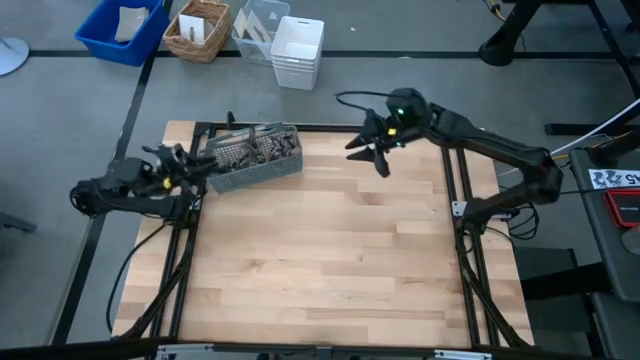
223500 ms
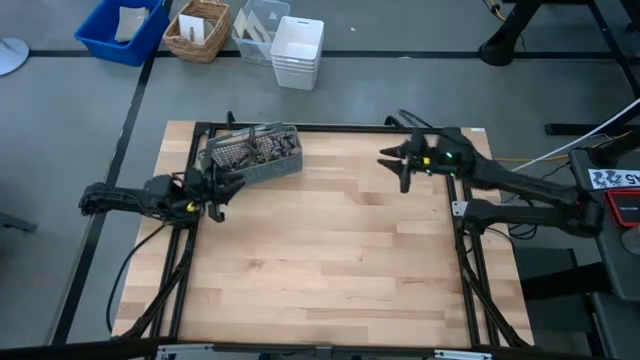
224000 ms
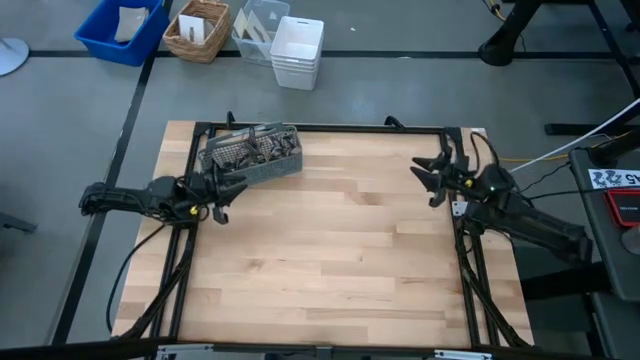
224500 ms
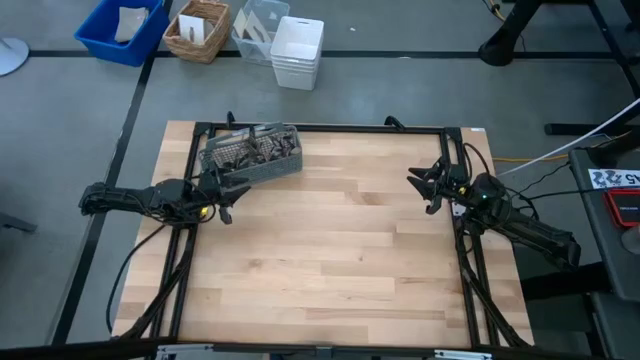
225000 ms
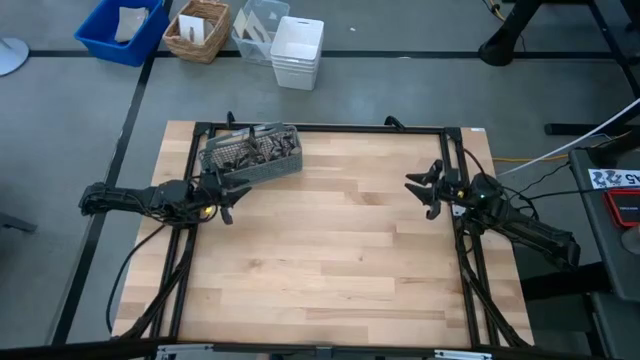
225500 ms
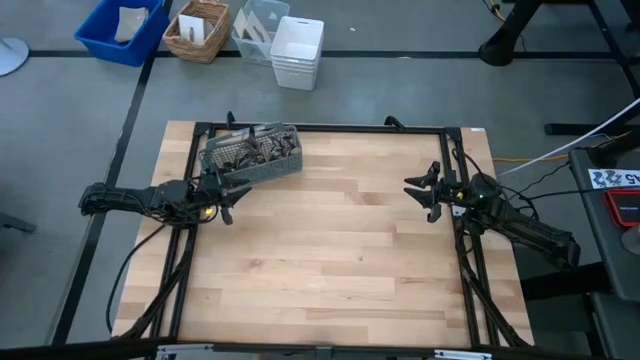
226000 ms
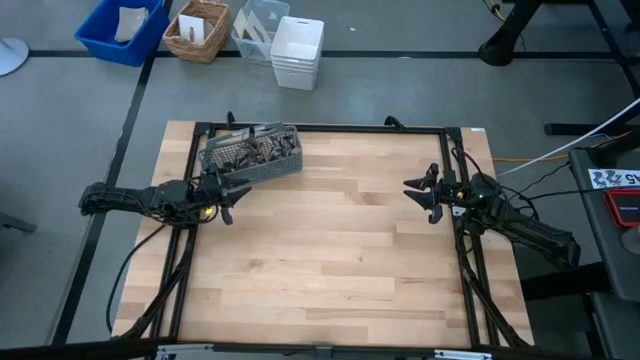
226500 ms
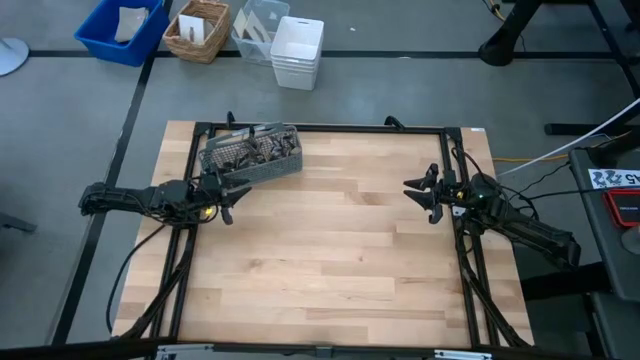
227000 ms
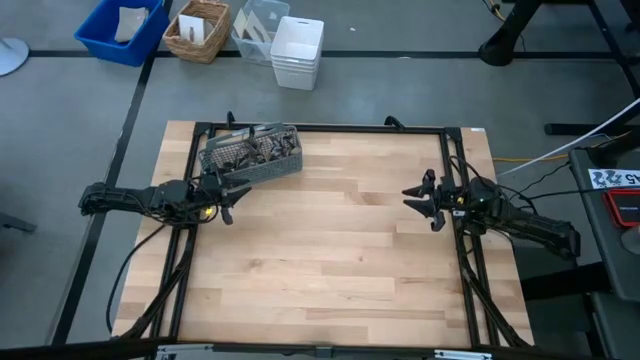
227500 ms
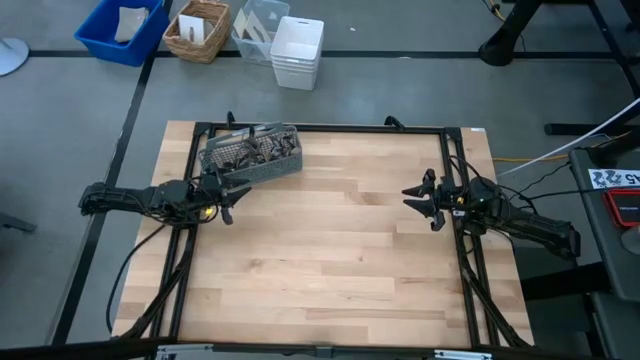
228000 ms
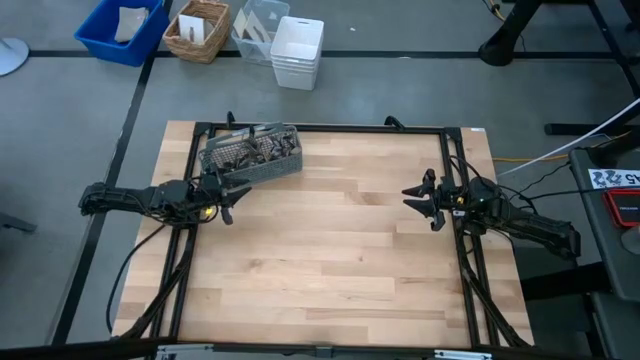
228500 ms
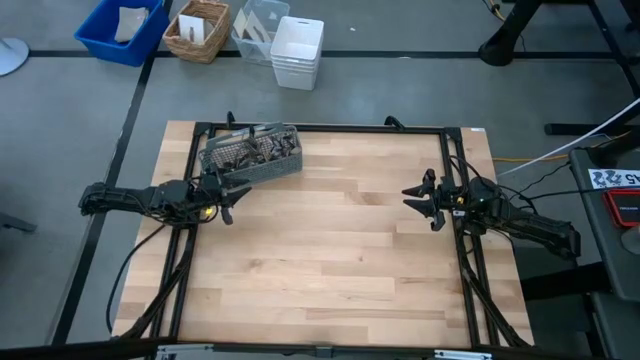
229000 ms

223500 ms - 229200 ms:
Task: Sort silverware
Return to Home Position

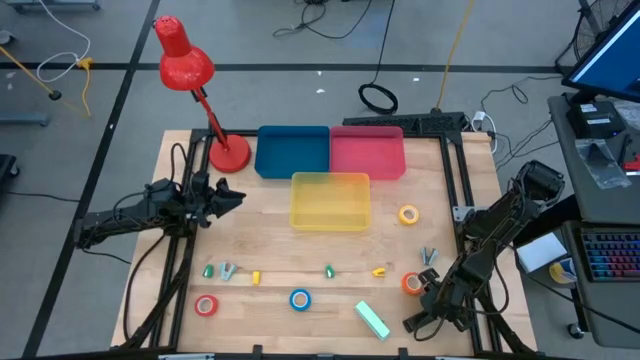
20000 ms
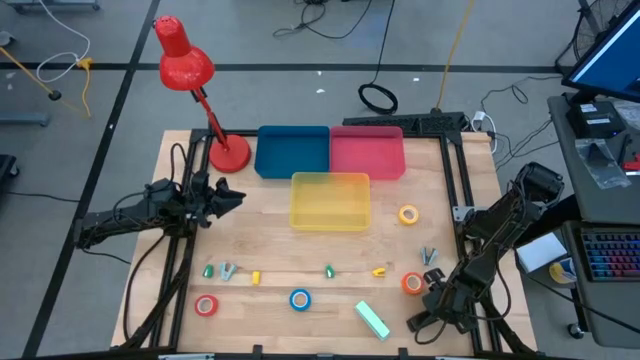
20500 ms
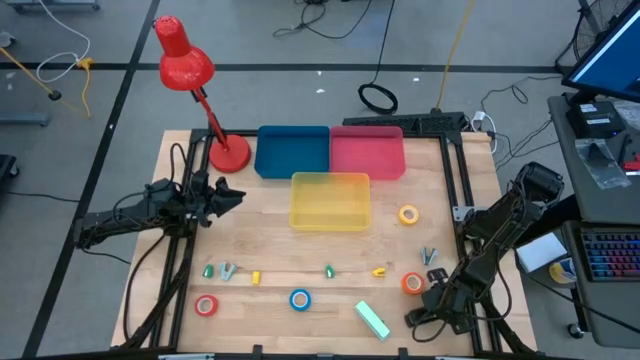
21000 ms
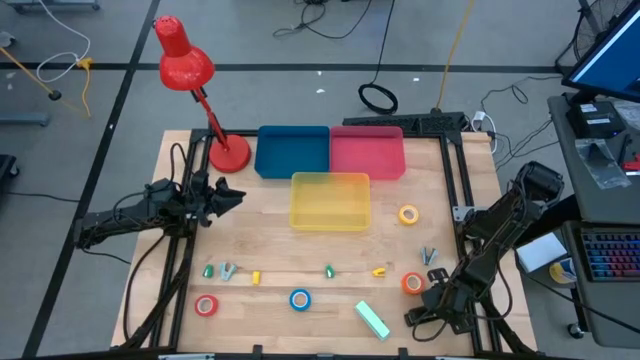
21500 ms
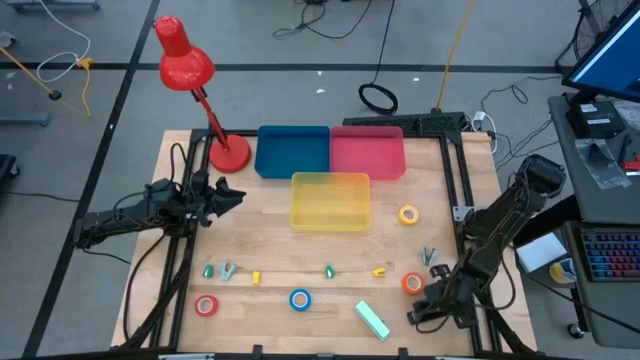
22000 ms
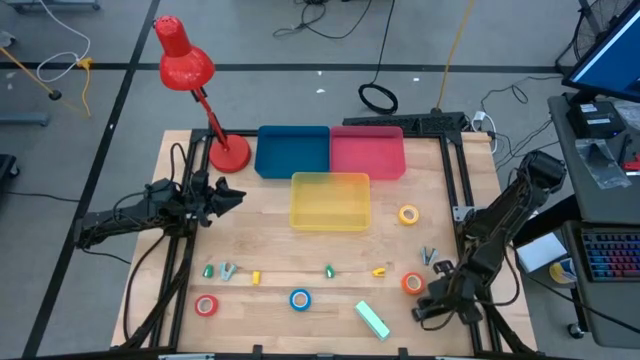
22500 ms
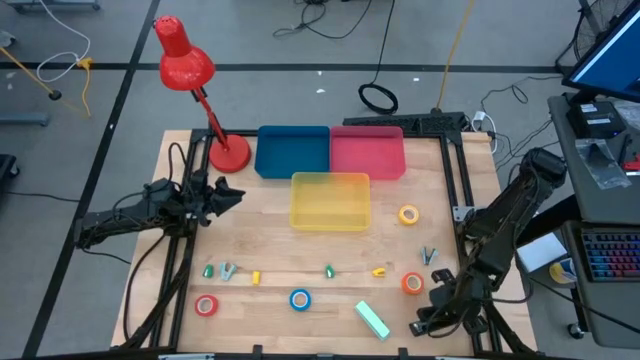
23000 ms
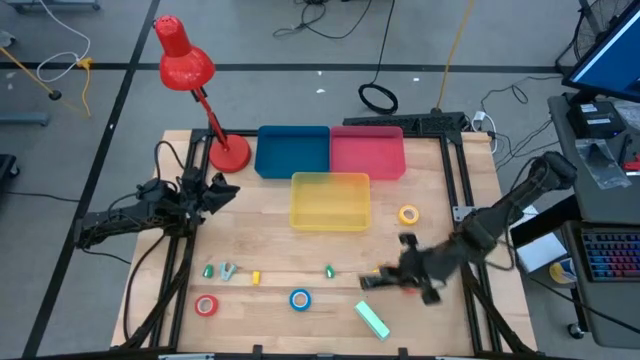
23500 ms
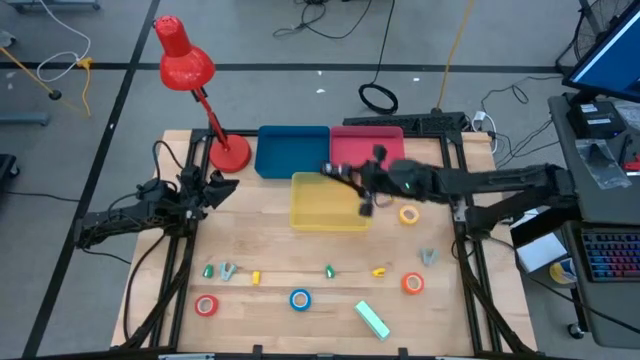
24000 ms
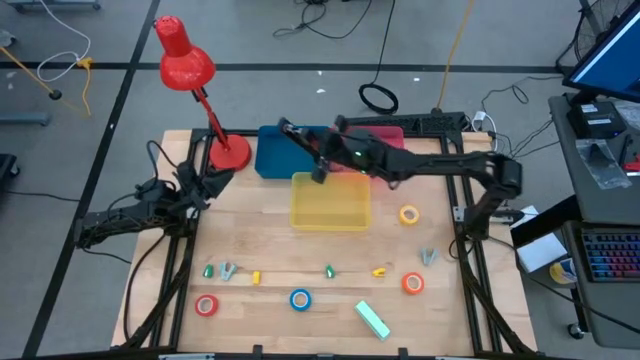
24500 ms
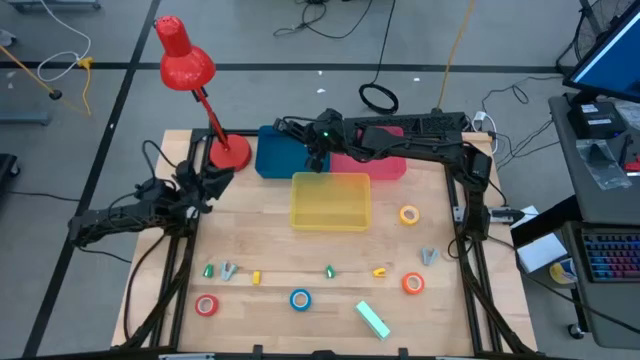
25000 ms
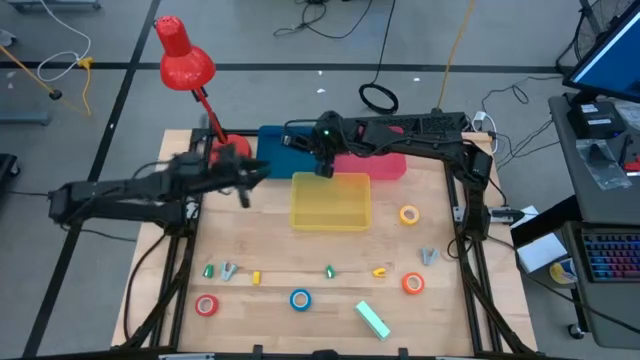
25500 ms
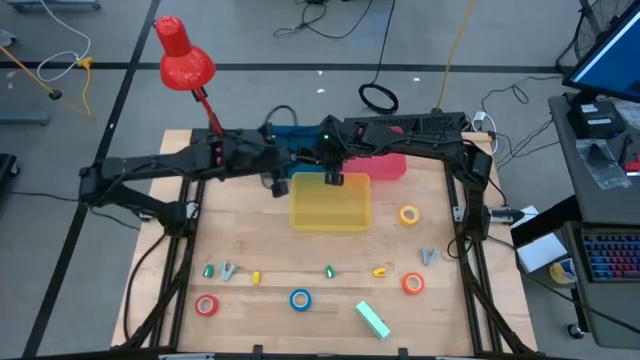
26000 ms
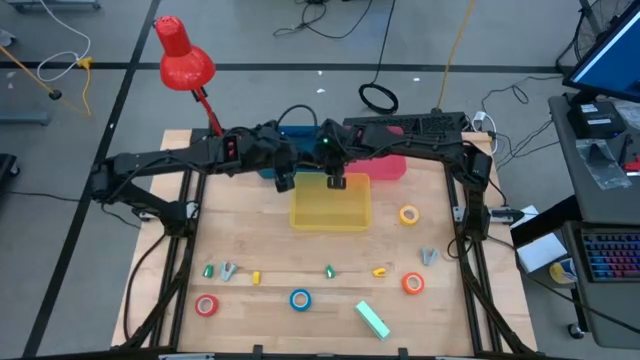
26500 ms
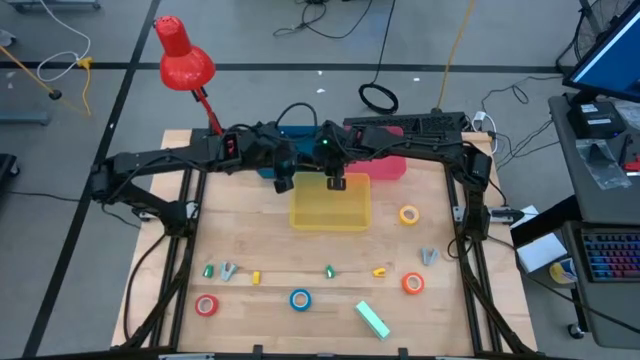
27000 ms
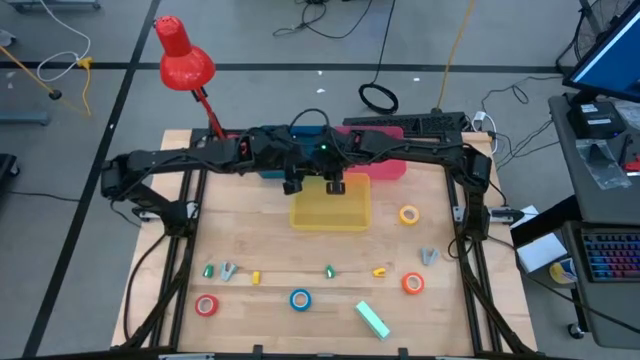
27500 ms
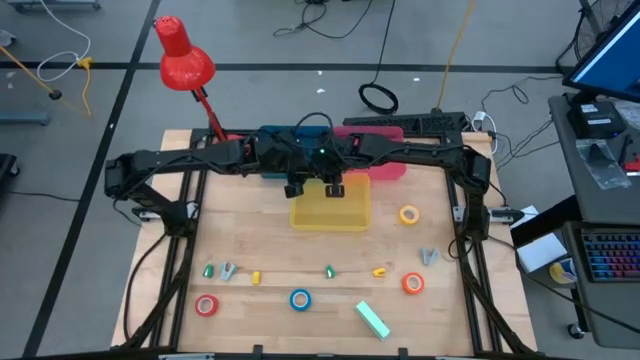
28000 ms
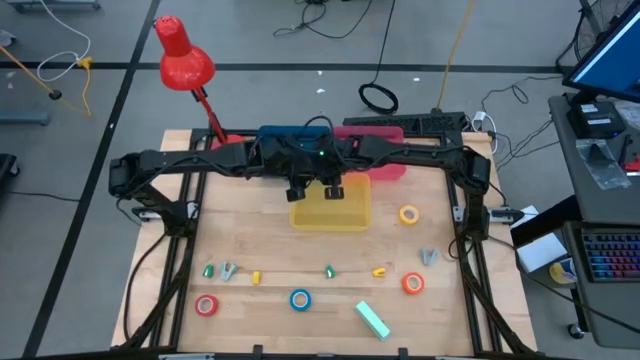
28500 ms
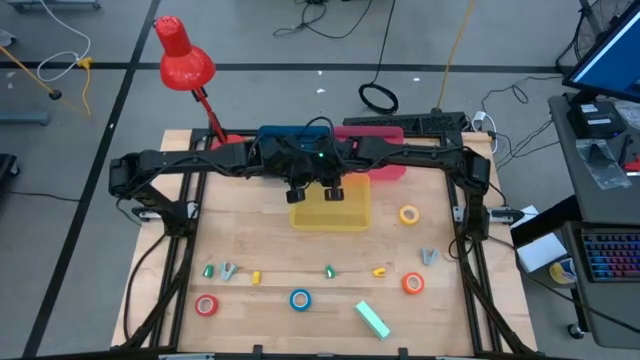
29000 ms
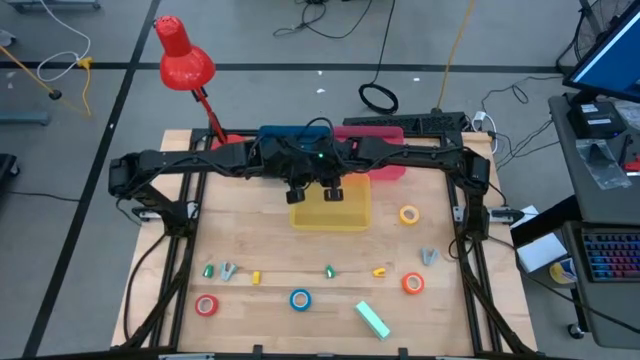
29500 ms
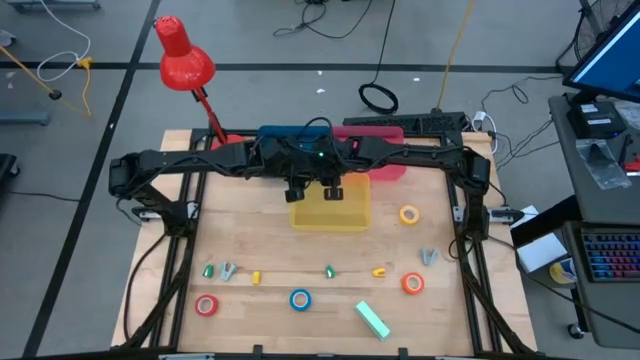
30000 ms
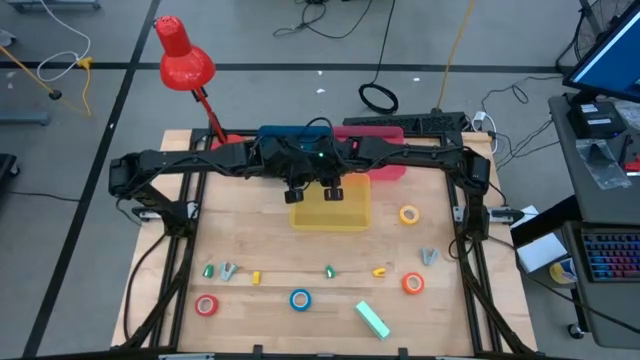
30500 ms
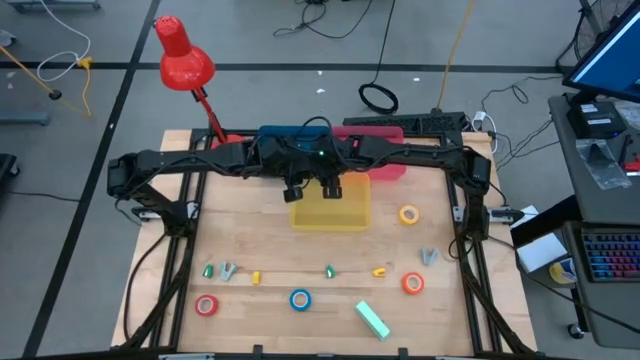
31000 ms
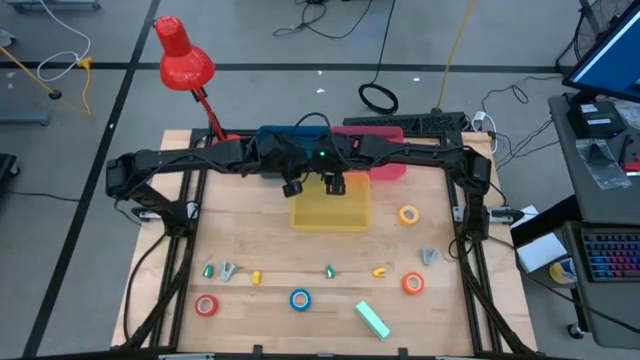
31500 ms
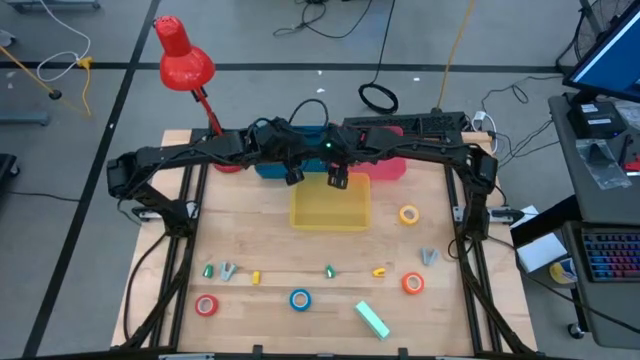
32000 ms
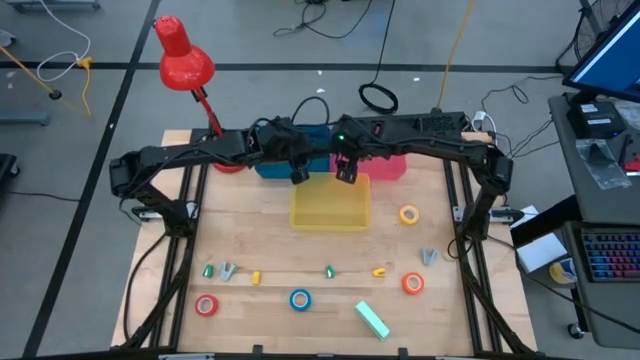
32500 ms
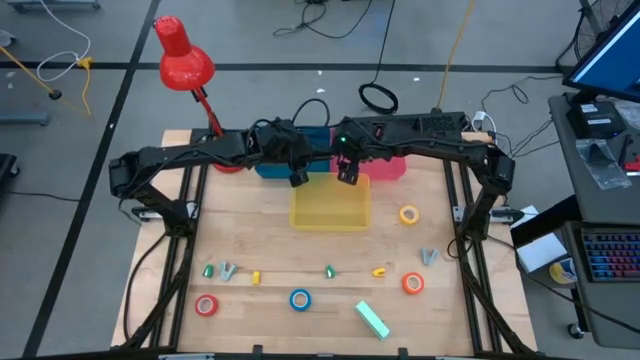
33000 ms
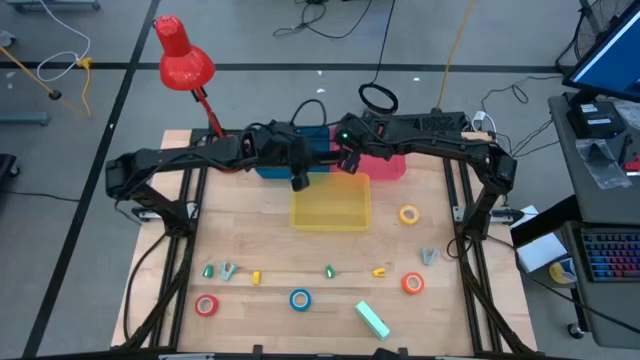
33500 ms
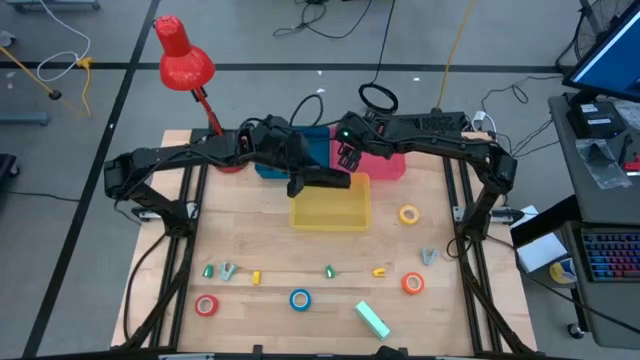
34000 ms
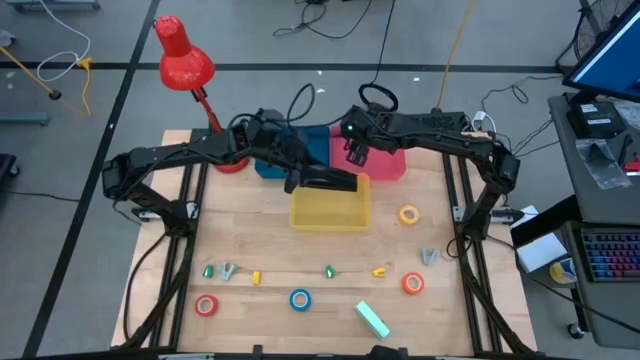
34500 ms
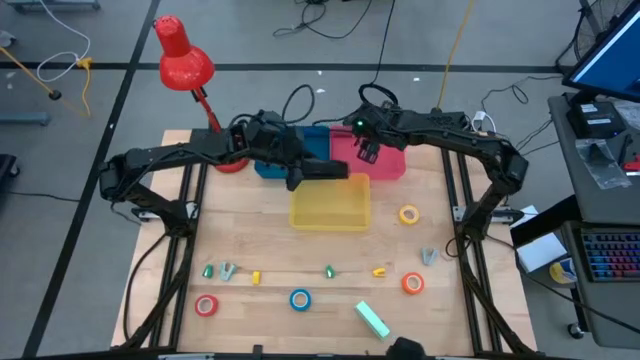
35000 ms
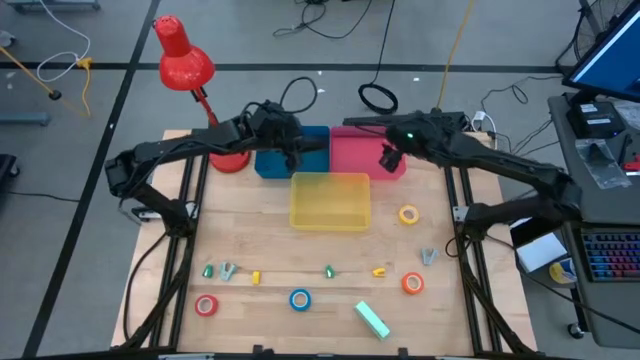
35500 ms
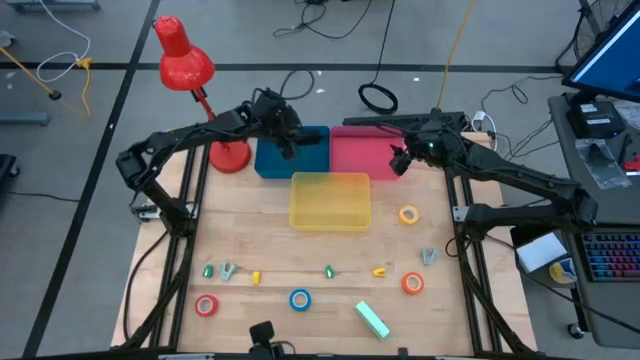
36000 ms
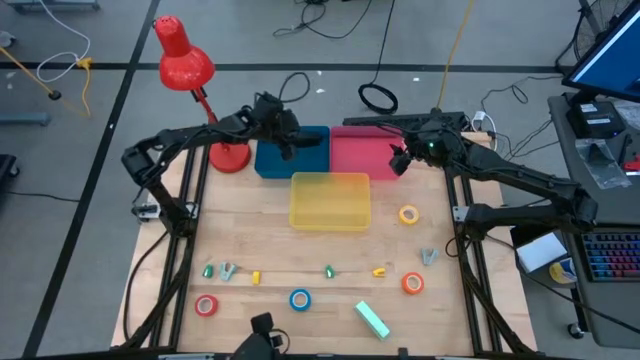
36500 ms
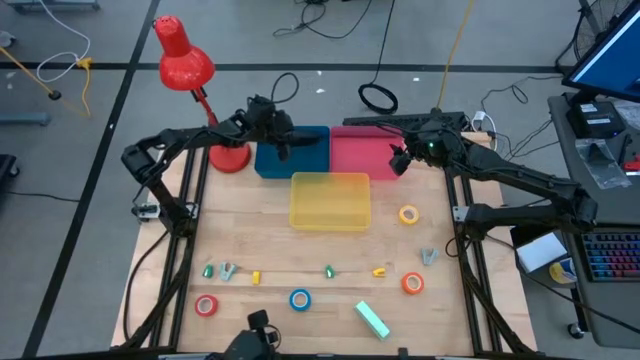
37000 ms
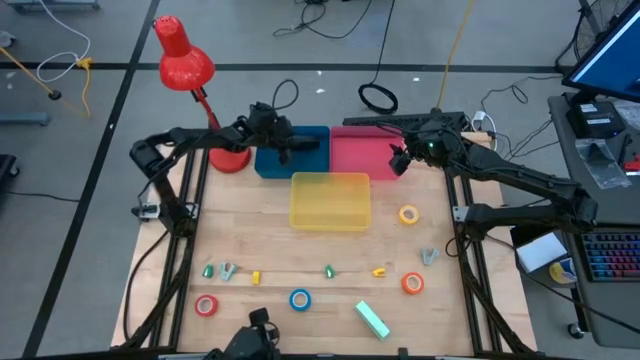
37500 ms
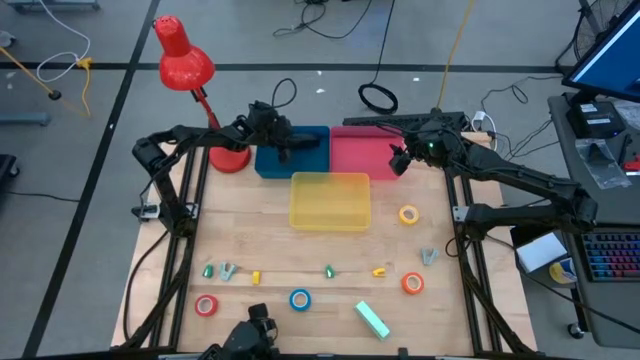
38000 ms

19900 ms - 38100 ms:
Task: Pick and place Stapler, Stapler remover, tape
Put the black stapler into the blue bin
